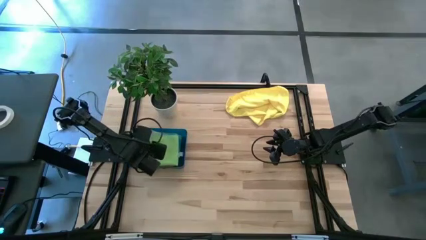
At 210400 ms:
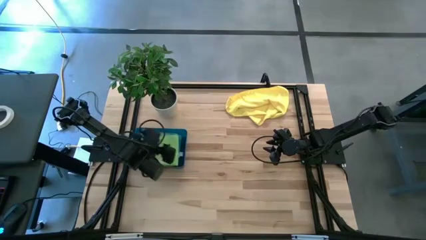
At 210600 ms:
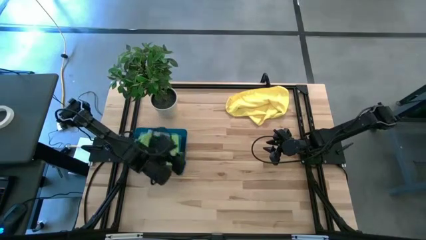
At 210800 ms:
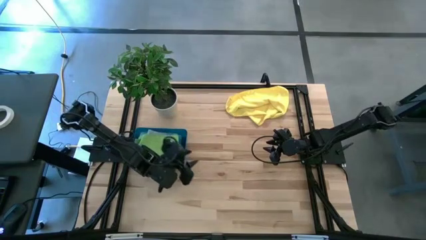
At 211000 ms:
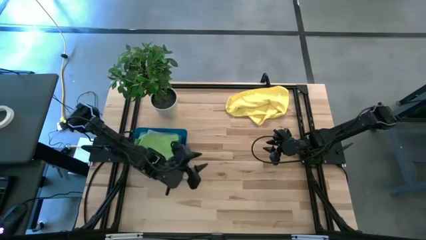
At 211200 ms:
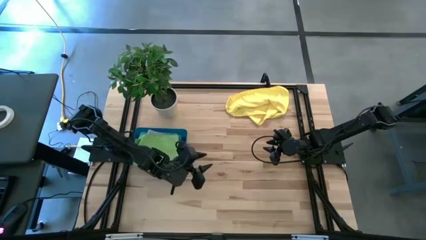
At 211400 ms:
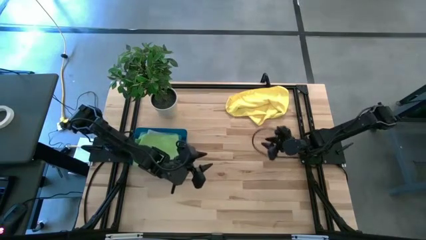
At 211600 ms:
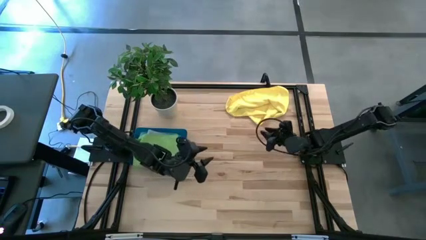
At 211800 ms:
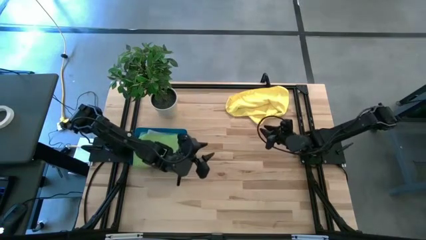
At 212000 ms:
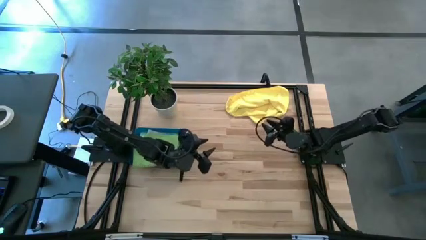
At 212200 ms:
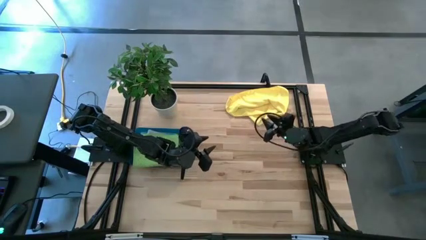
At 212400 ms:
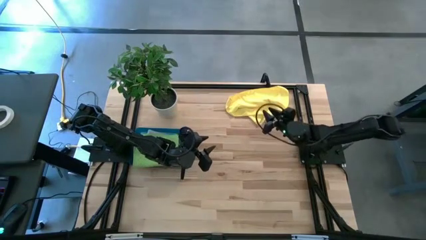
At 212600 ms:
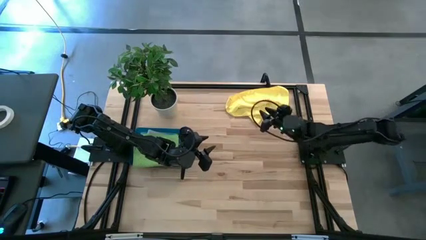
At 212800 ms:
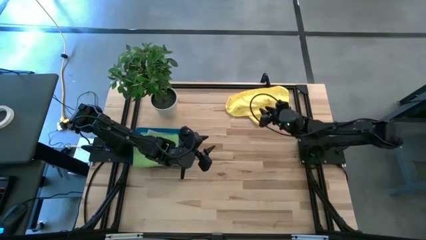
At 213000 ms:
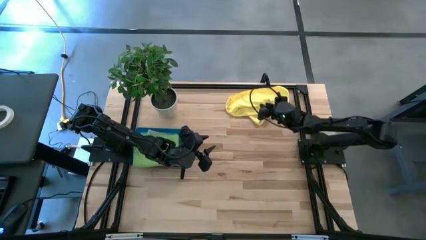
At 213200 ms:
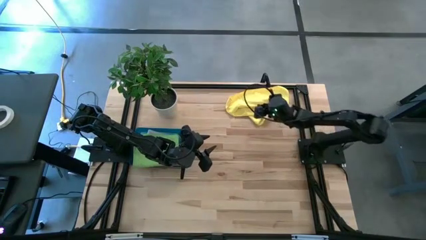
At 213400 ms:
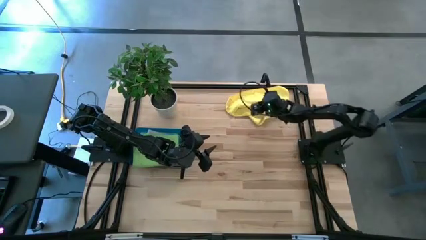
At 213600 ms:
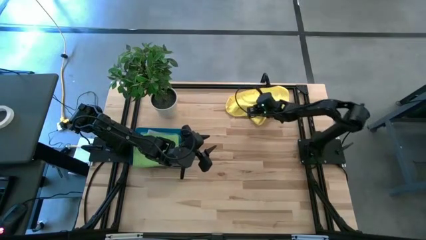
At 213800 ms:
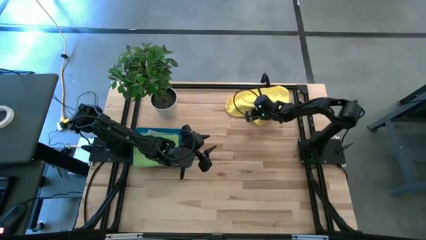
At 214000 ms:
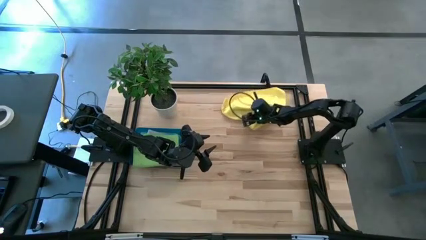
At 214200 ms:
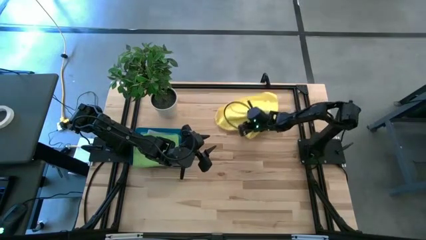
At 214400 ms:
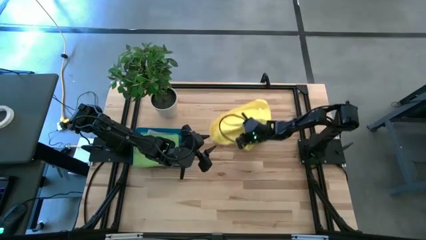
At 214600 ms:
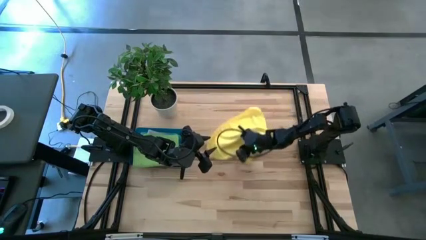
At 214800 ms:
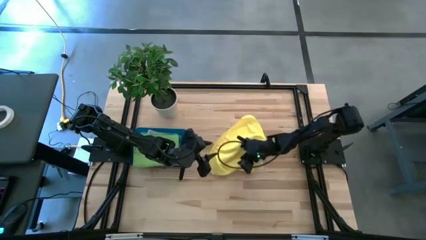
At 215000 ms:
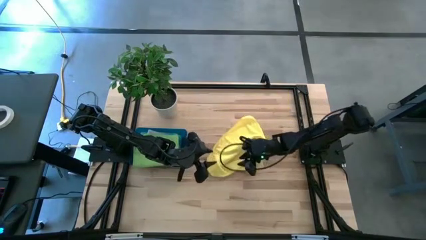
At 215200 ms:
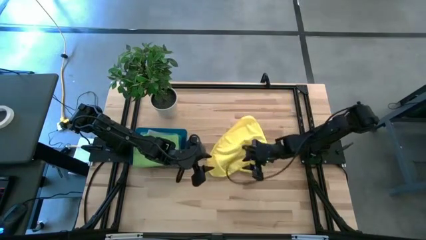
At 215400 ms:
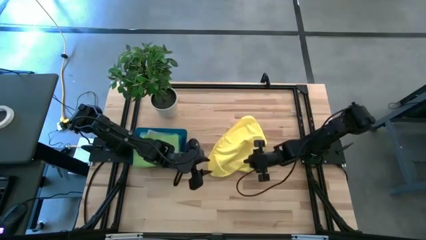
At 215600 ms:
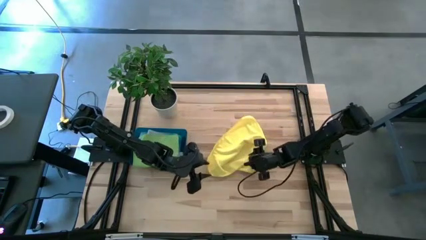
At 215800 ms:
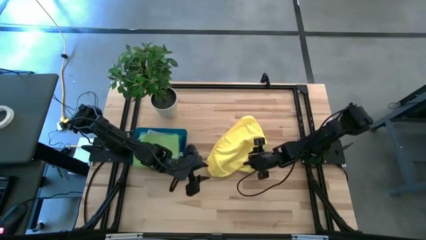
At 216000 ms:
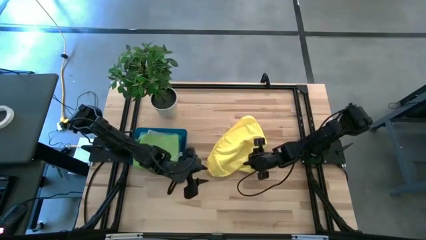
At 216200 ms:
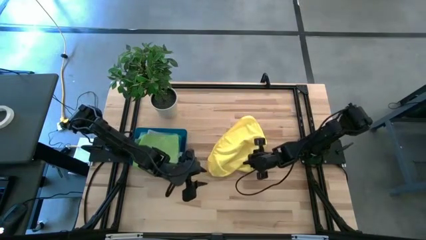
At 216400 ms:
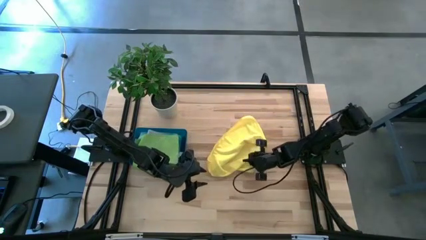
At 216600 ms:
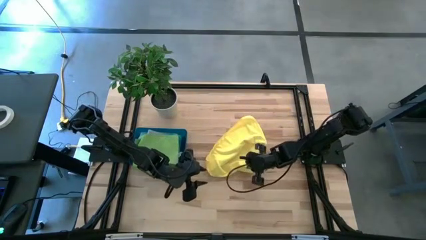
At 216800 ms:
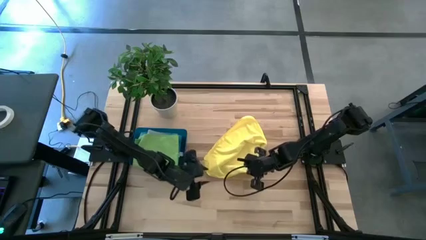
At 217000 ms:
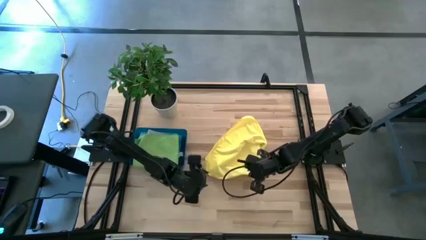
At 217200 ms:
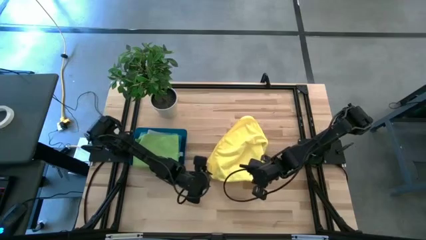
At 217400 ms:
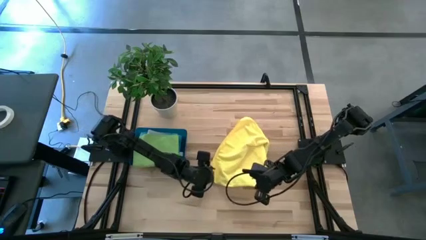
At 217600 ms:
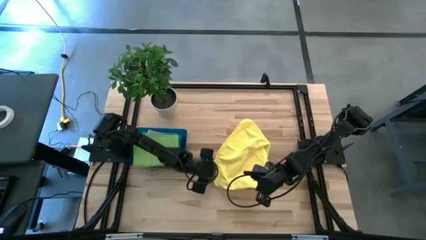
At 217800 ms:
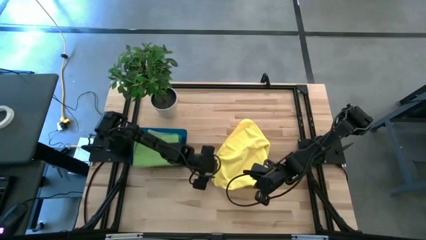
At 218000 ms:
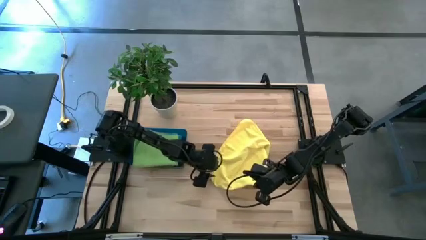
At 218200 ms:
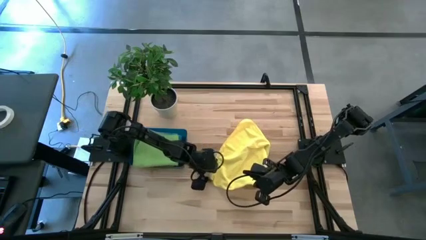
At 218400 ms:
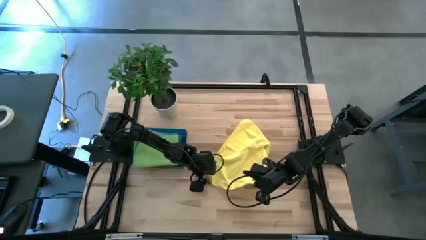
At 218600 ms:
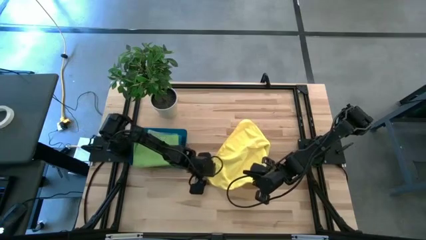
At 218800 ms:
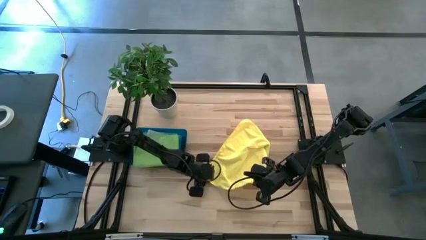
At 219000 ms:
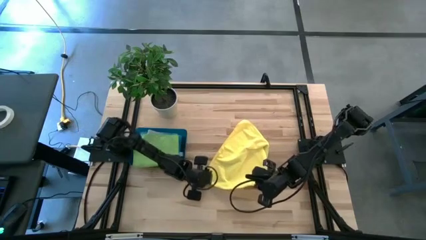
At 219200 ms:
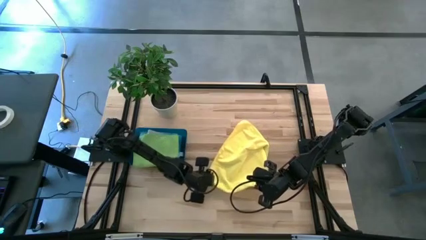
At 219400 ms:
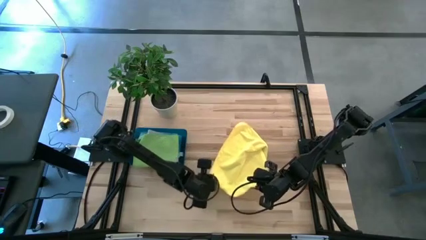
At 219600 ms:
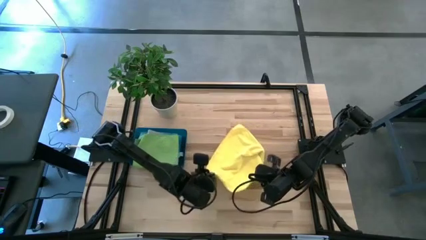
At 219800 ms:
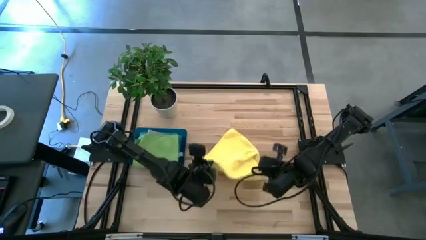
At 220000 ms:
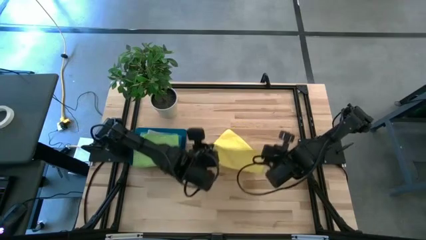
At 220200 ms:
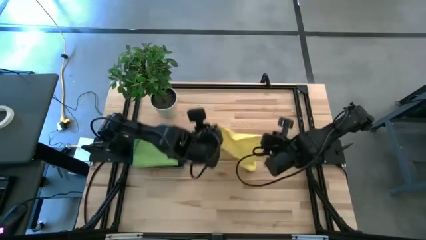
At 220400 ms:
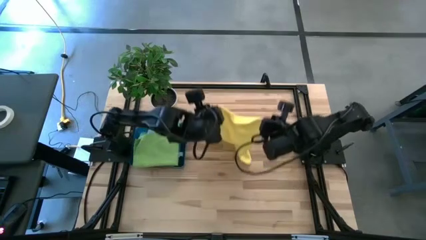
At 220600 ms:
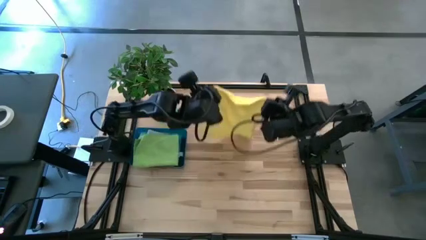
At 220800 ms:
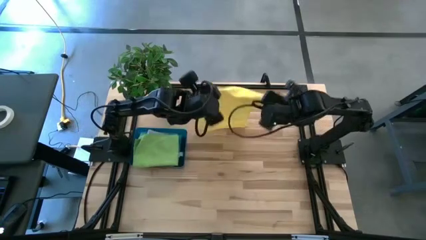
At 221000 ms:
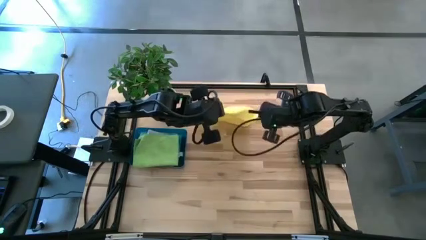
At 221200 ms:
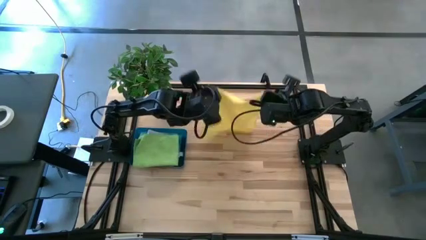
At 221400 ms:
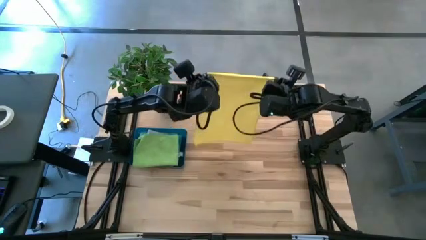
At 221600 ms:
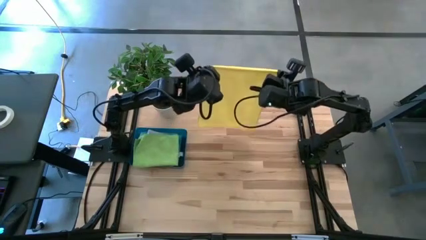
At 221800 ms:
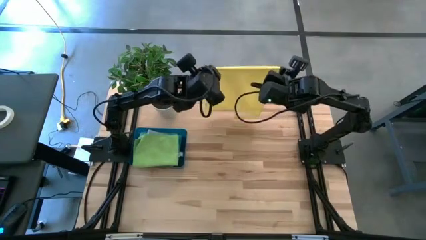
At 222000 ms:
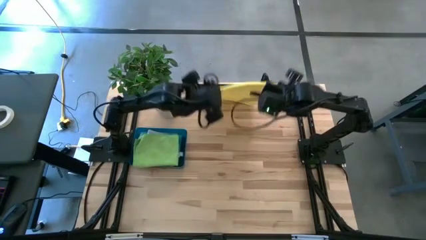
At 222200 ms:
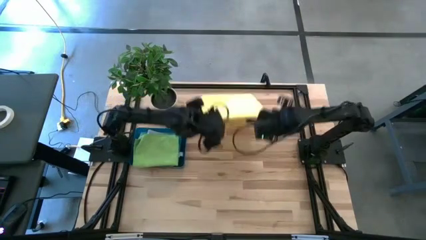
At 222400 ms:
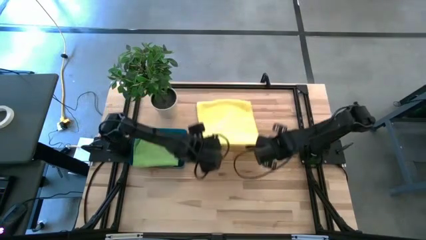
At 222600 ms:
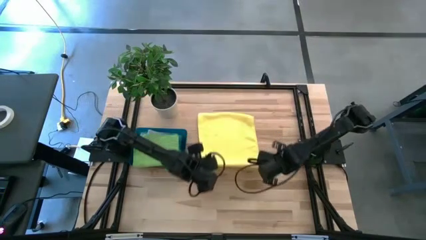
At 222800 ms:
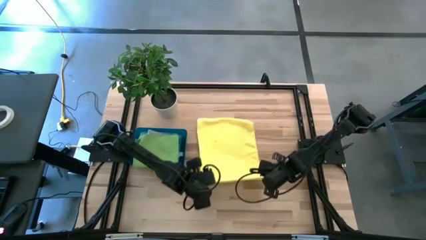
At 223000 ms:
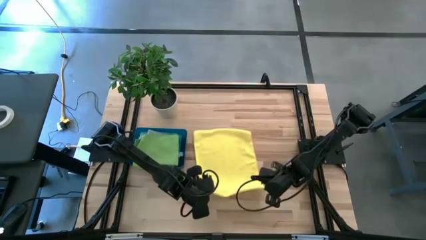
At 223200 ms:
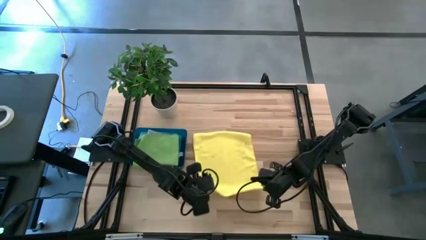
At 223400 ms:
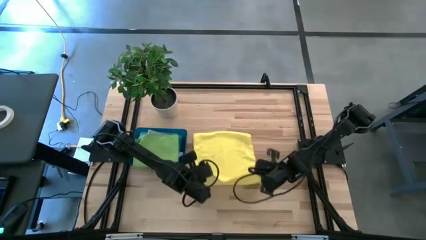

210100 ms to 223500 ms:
Task: Fold microfiber towels
Fold the yellow towel on the table

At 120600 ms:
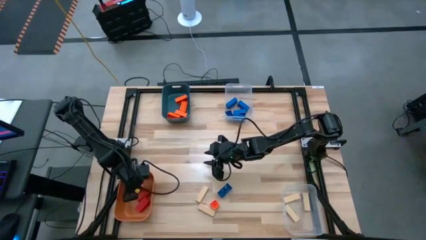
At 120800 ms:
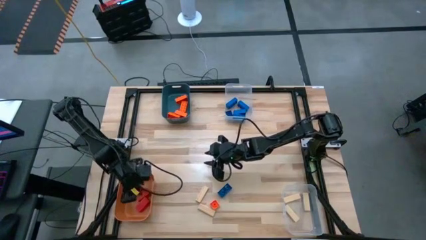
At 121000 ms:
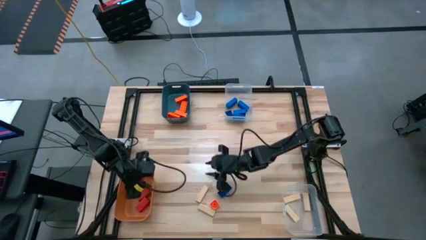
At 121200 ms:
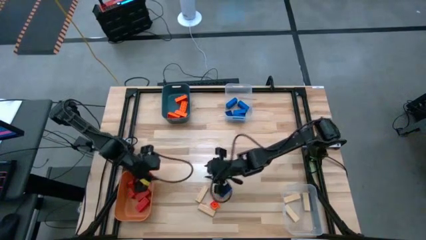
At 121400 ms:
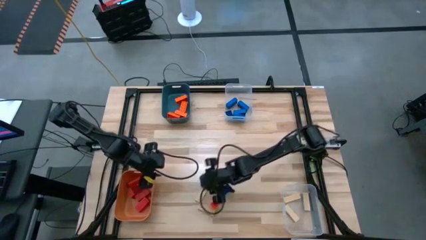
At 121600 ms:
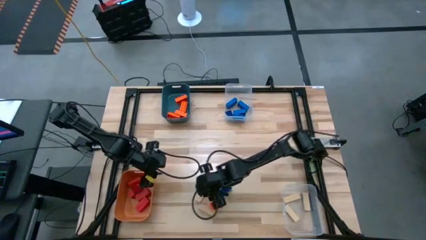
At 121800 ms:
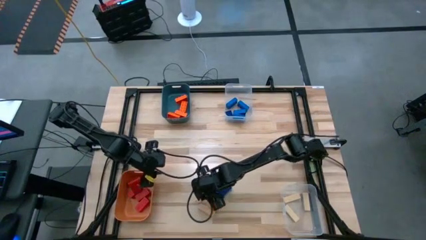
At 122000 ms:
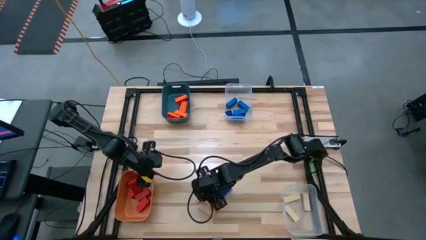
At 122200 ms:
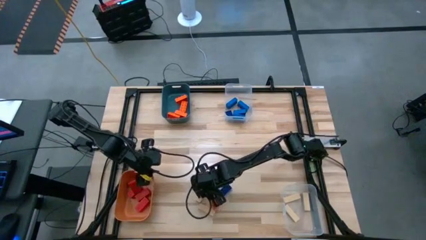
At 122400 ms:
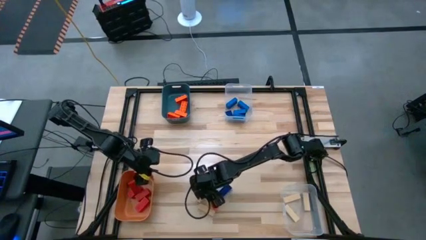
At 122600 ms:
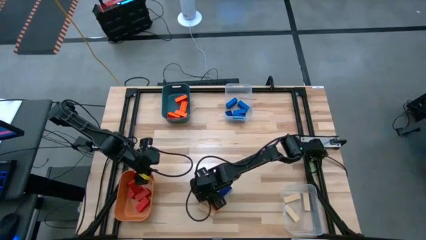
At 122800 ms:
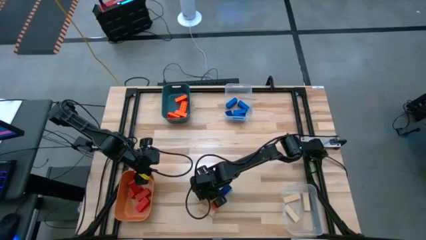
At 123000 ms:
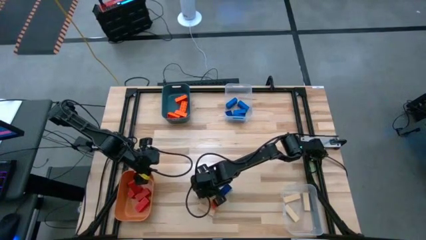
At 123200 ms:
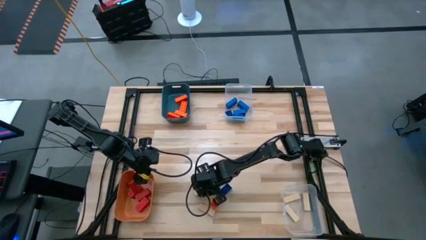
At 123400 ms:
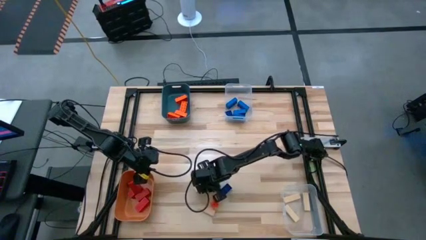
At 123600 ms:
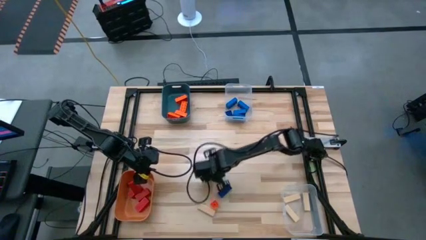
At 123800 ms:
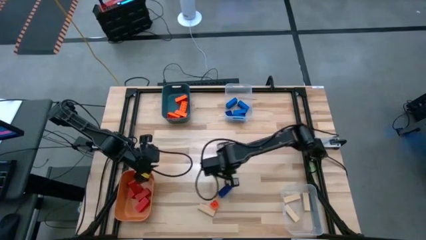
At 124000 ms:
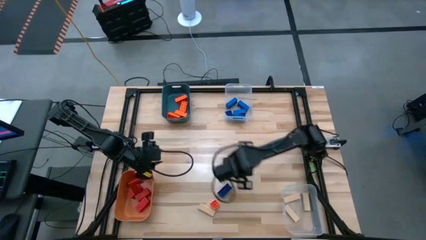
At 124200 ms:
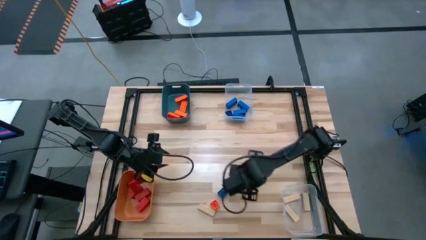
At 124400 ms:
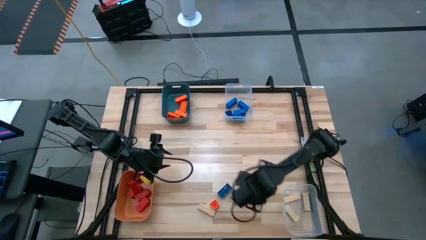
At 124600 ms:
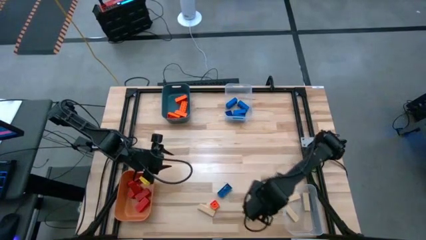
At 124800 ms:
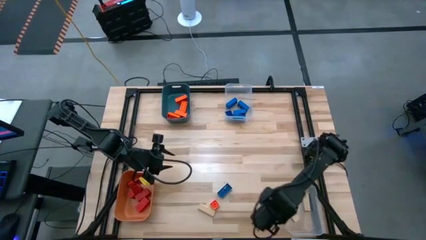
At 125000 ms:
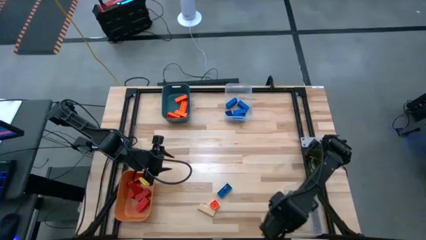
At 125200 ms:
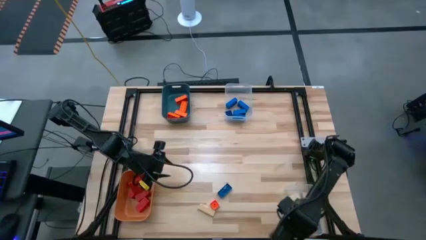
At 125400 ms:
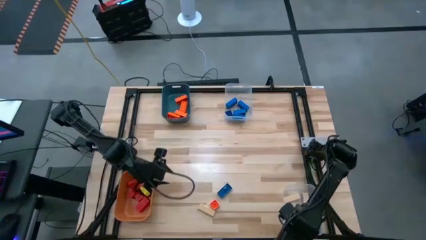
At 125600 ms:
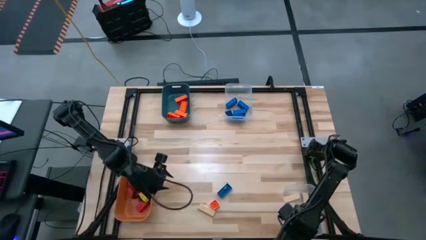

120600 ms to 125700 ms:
Task: Sort blocks
Put the brown block into the bottom transparent bin
